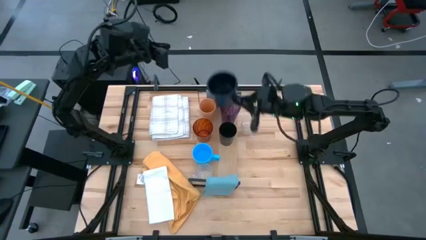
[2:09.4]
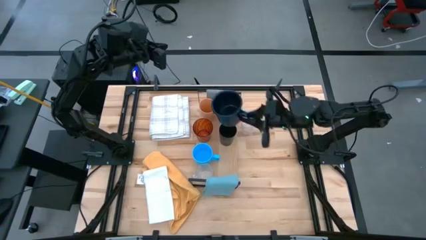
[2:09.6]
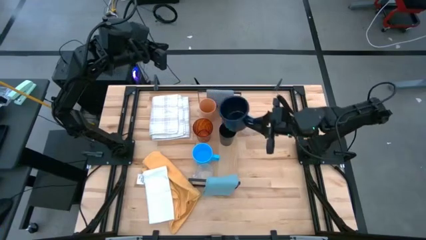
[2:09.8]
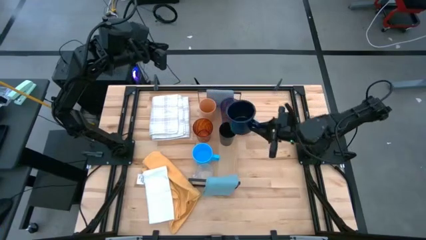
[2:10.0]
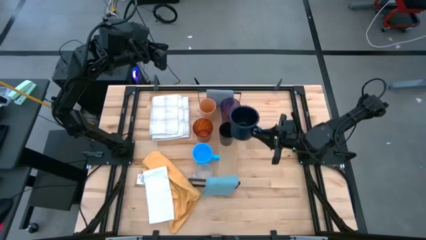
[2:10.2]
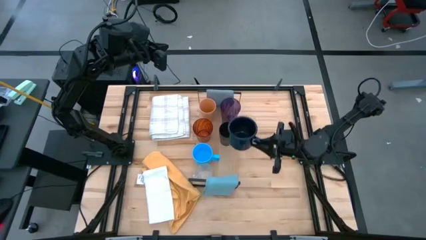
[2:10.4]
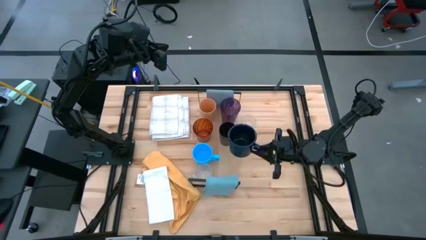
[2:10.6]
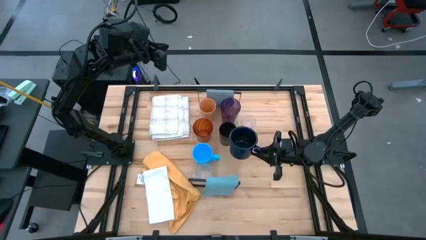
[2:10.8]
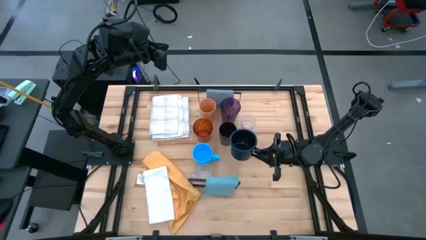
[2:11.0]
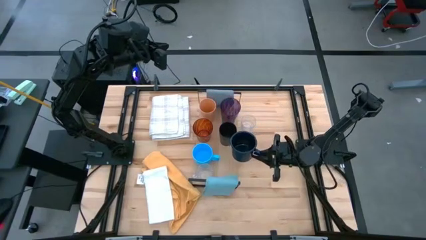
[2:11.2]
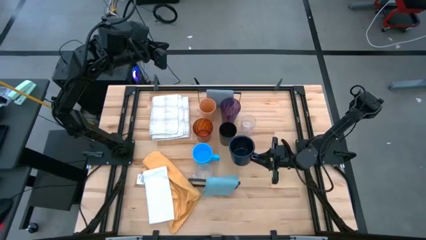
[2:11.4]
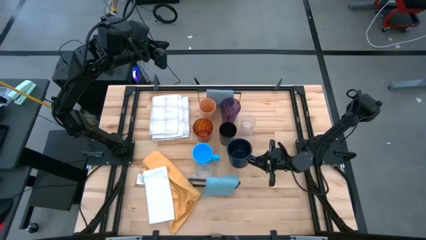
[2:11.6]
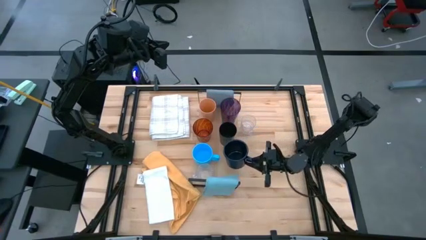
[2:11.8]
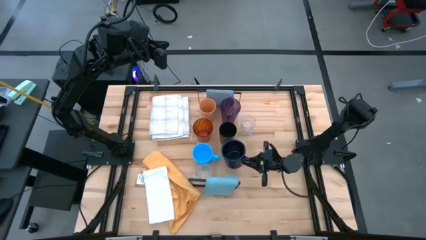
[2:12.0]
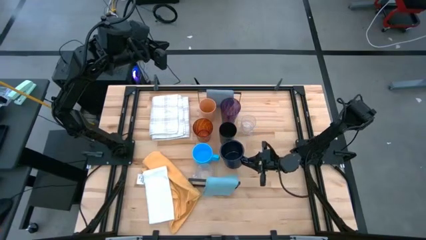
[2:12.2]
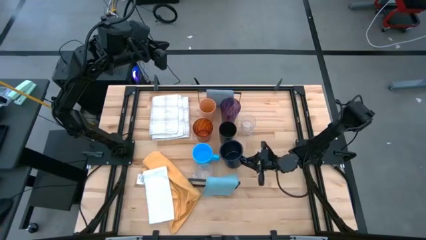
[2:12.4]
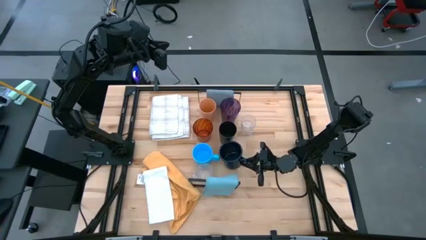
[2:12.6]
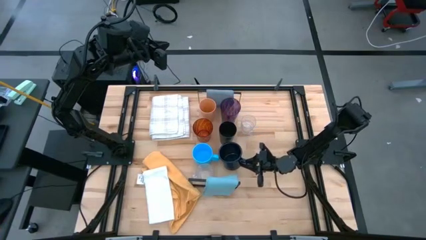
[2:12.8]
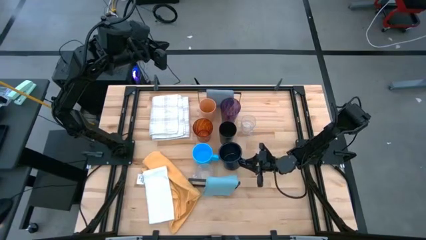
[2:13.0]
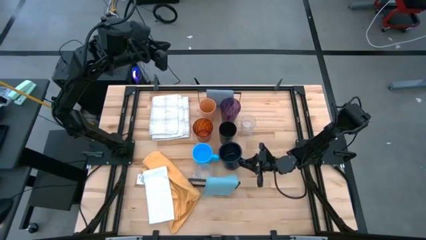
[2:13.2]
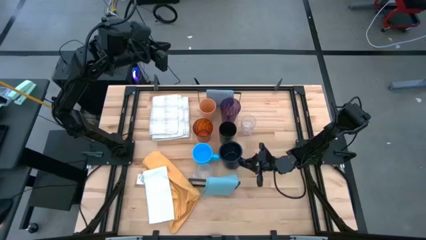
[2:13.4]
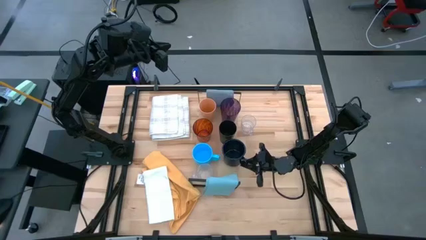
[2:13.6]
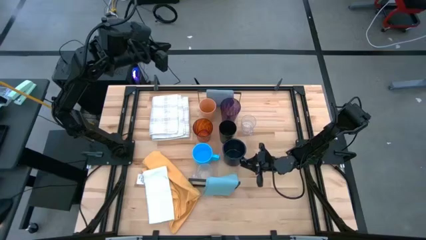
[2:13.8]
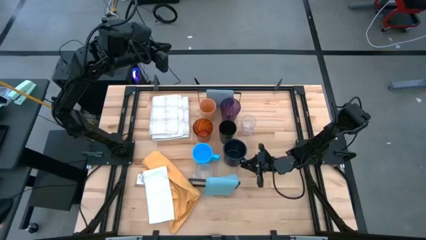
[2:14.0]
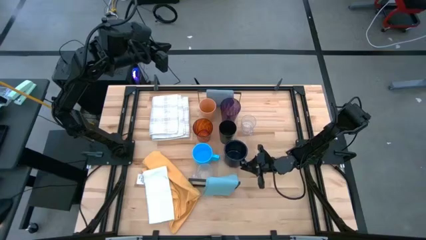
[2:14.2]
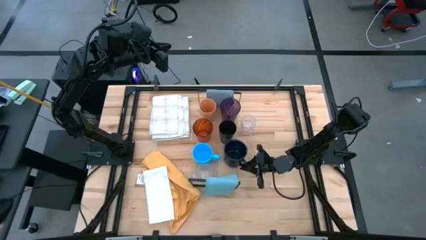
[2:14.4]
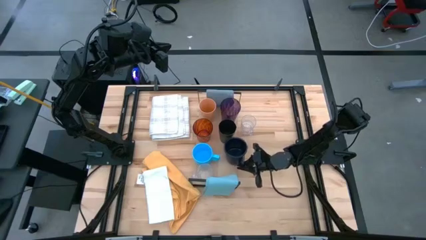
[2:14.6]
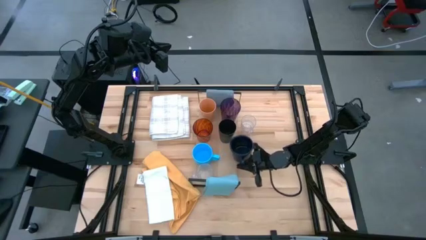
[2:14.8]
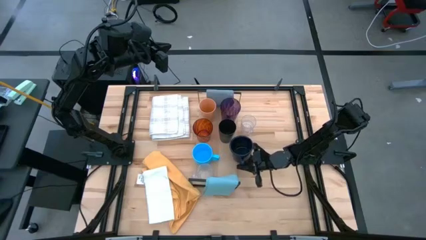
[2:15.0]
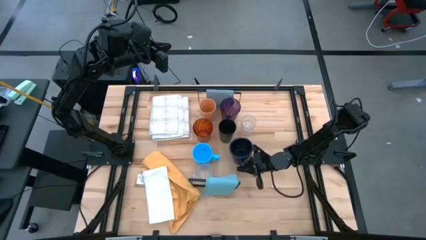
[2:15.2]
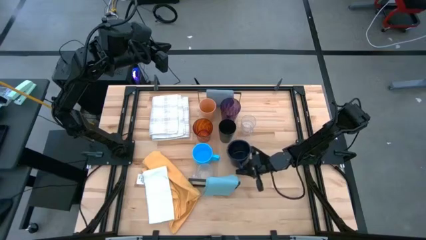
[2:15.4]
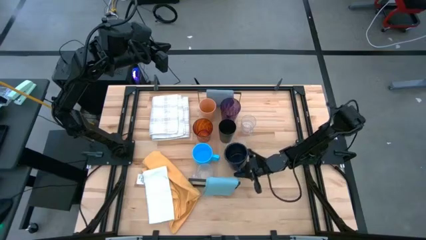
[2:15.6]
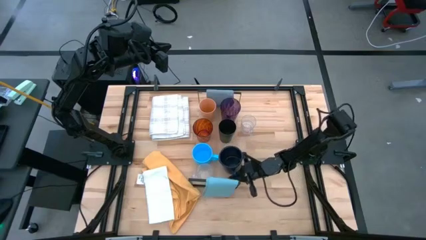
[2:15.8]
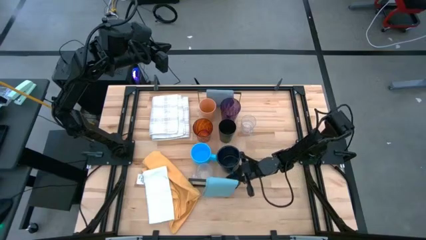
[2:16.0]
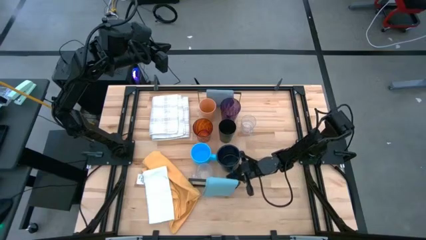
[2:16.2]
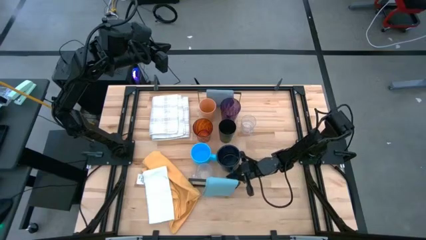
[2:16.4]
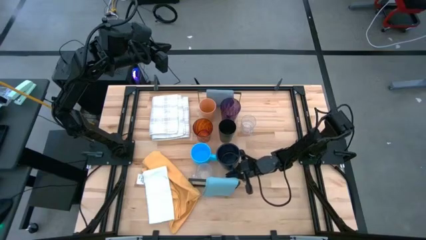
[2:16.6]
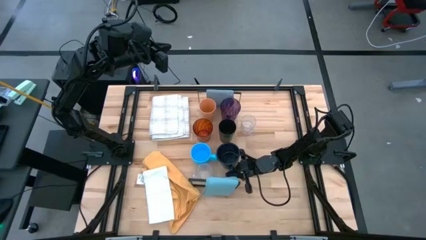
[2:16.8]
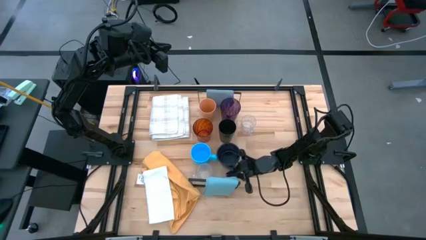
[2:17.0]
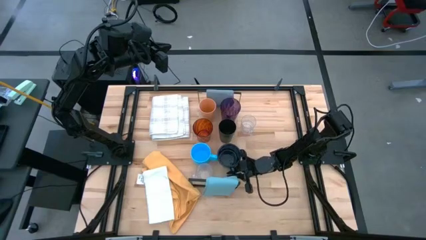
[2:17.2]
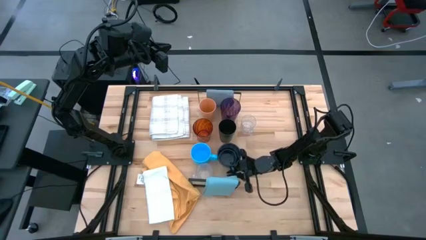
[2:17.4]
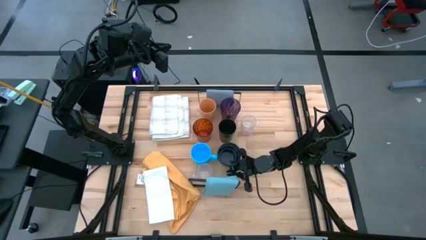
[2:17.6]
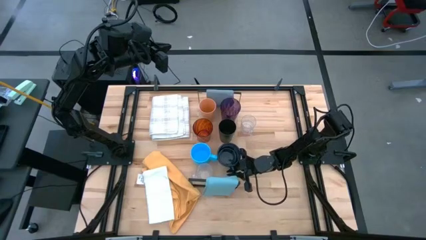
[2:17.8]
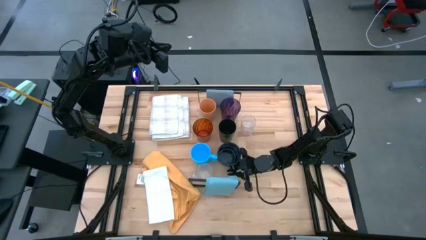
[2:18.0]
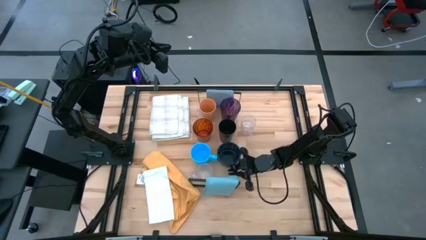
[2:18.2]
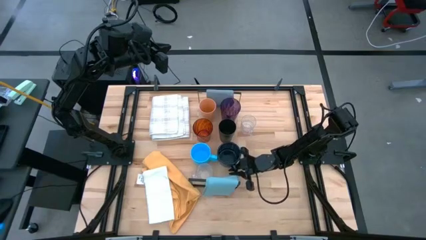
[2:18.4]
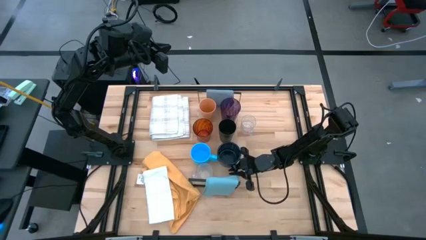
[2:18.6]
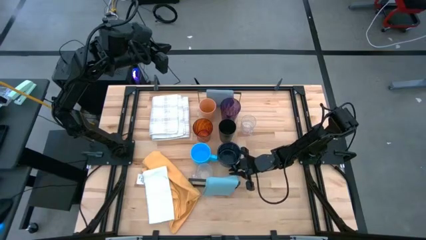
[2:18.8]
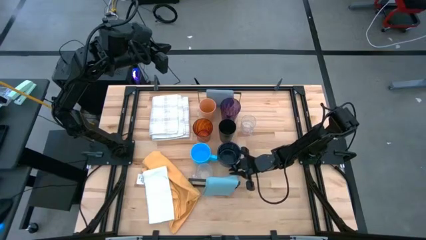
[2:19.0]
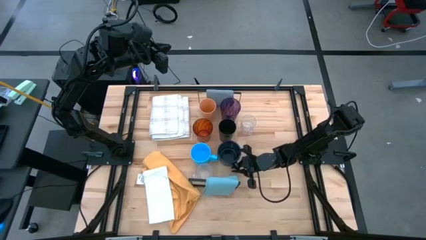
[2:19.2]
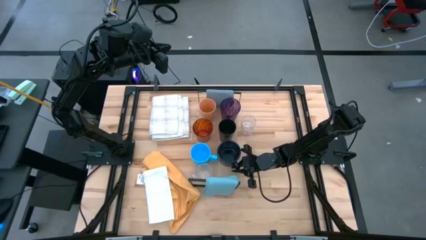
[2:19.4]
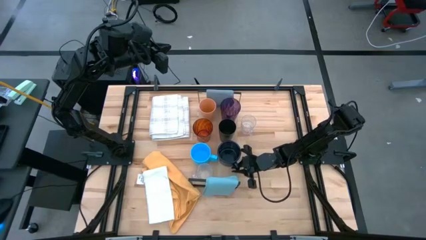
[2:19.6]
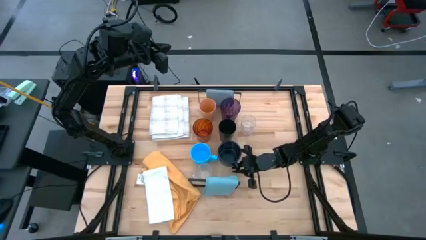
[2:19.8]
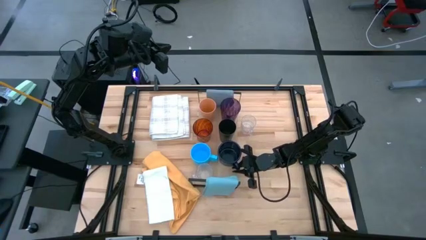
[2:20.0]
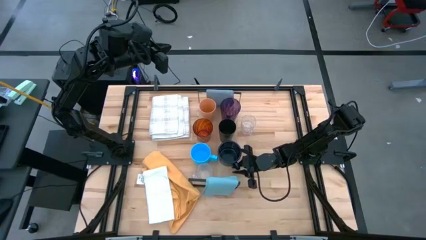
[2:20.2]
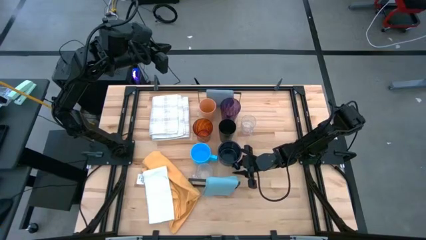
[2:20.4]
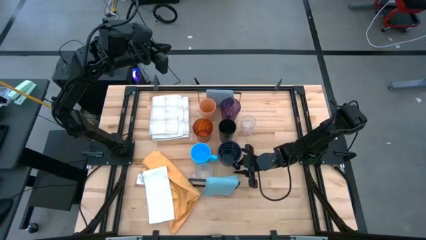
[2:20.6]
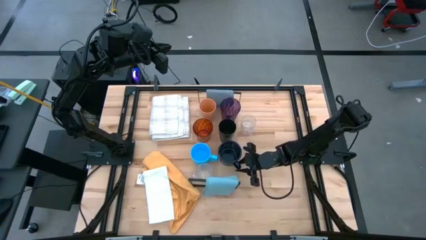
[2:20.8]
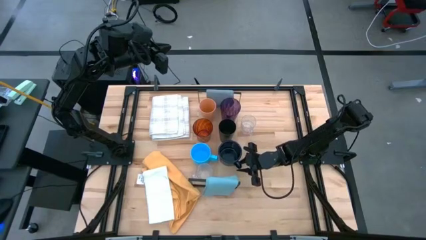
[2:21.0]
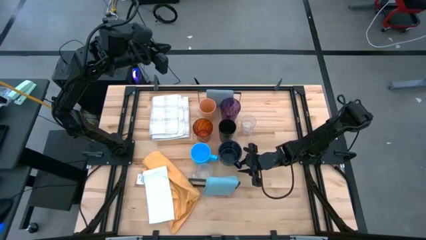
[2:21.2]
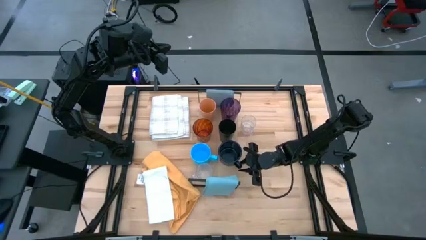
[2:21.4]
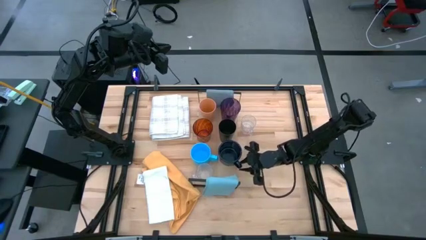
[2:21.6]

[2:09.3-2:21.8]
Task: Stack small to large cups/mugs on shelf
Put the dark blue mug on the shelf

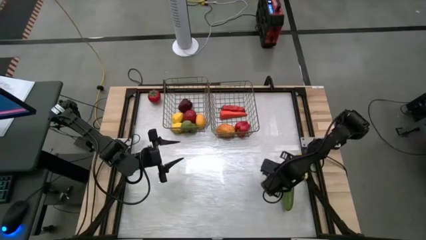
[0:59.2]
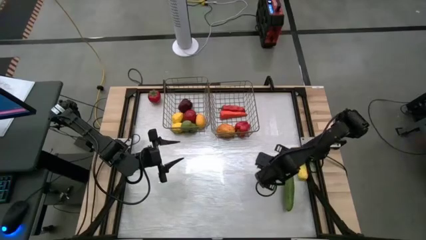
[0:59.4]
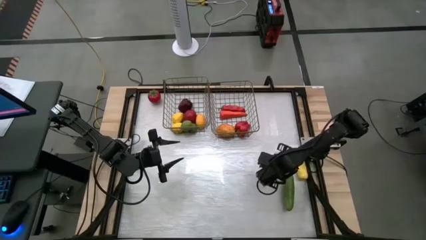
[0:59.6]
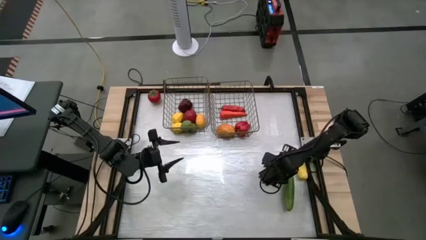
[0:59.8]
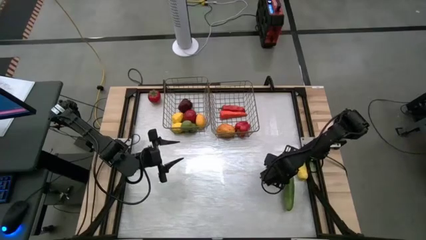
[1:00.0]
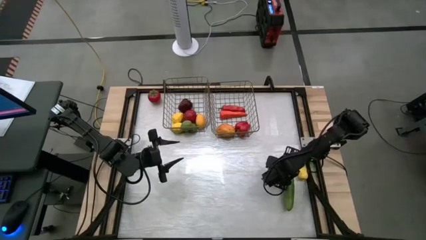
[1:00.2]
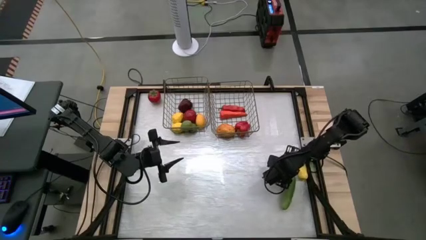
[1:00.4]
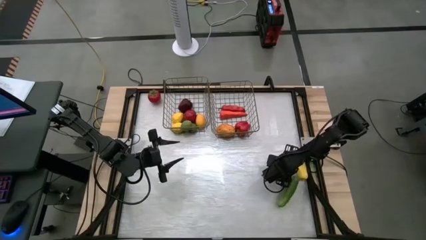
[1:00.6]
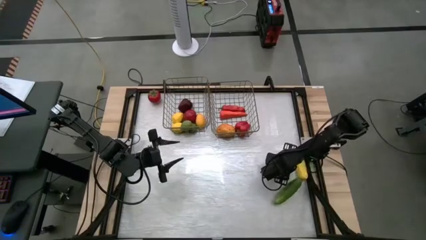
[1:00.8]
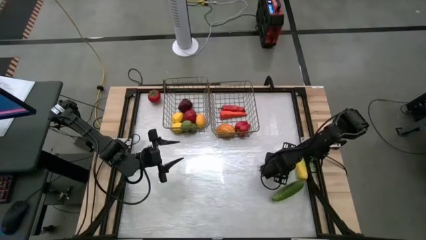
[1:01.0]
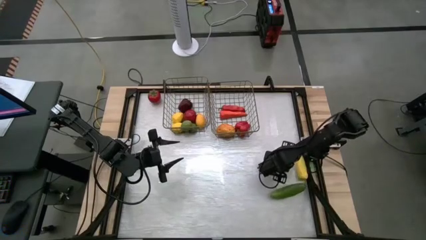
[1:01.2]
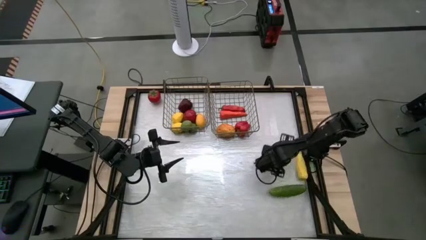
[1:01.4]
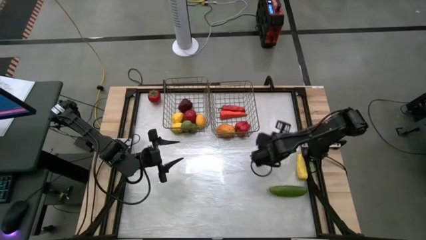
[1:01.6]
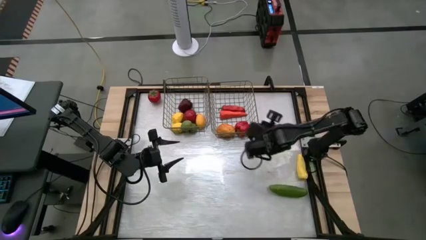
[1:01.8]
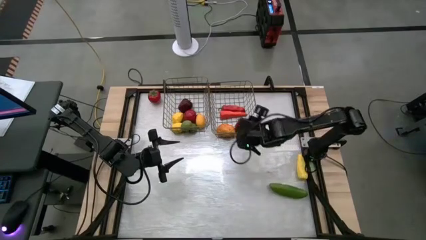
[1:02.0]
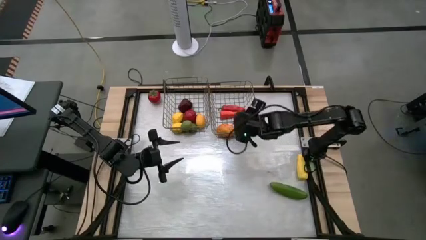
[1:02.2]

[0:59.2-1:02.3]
Task: Sort produce into baskets
Put the eggplant into the right wire basket
